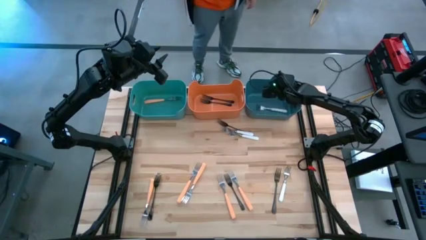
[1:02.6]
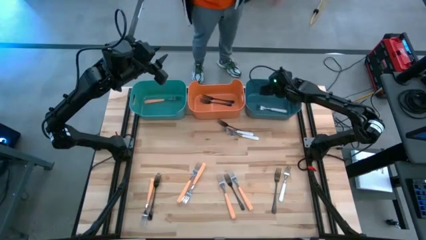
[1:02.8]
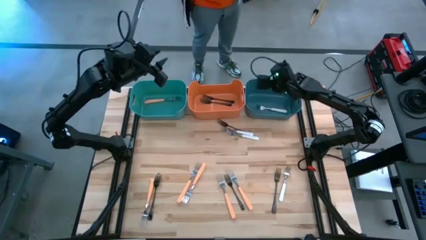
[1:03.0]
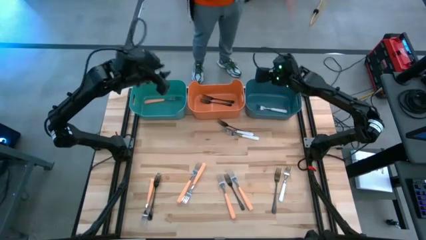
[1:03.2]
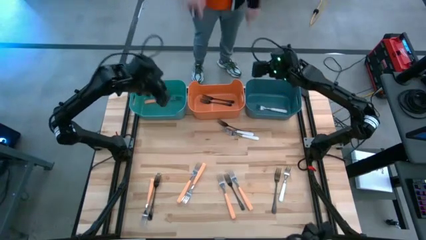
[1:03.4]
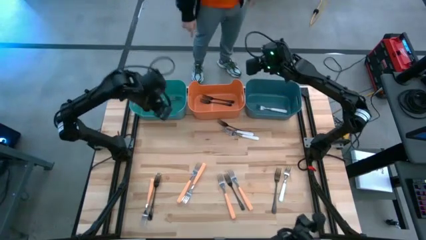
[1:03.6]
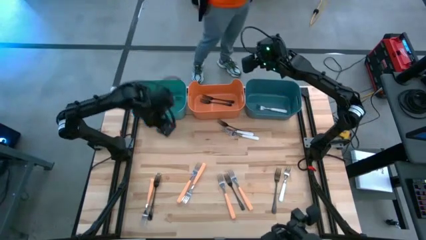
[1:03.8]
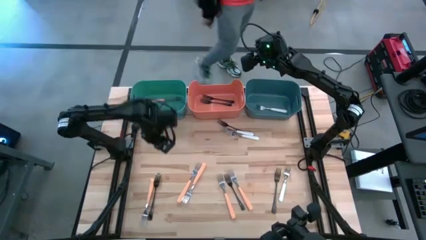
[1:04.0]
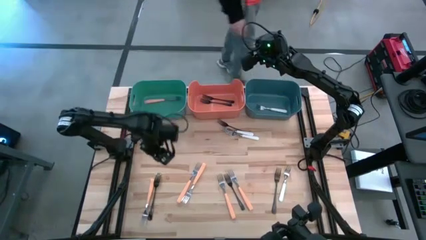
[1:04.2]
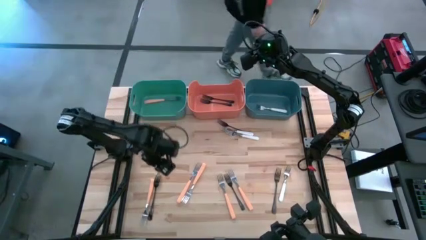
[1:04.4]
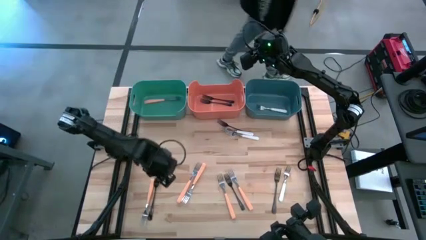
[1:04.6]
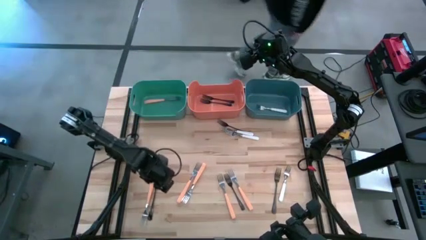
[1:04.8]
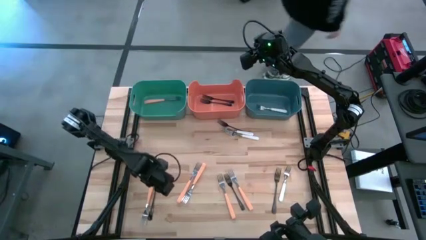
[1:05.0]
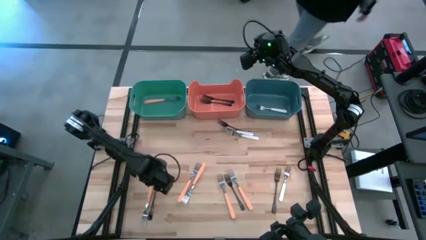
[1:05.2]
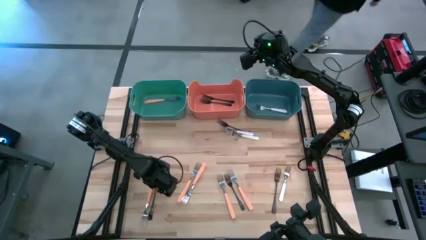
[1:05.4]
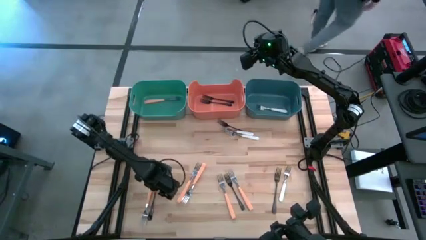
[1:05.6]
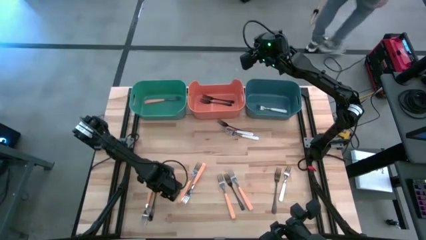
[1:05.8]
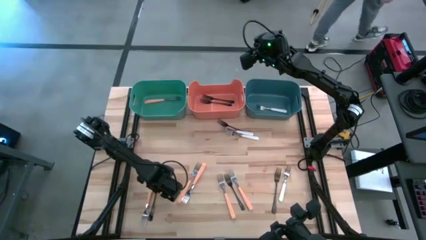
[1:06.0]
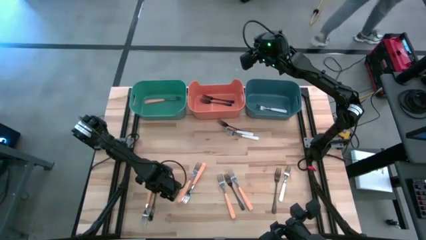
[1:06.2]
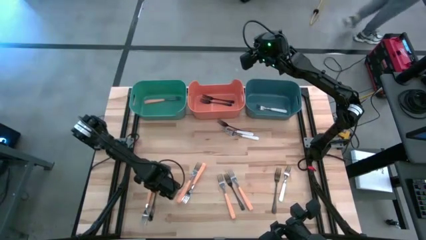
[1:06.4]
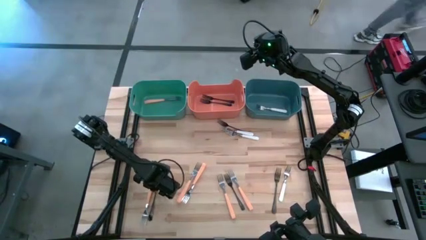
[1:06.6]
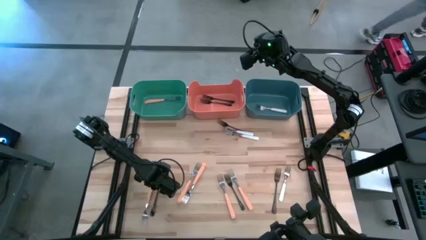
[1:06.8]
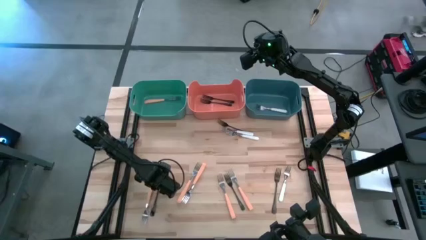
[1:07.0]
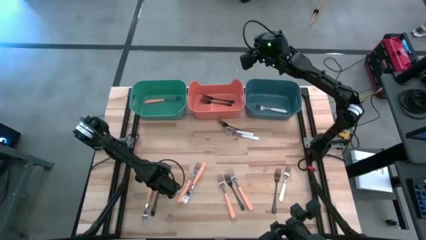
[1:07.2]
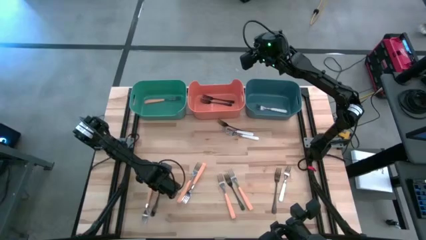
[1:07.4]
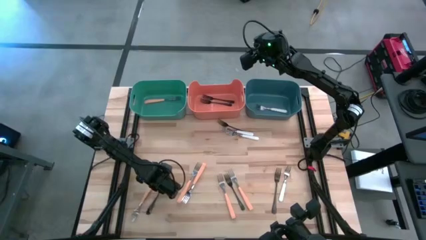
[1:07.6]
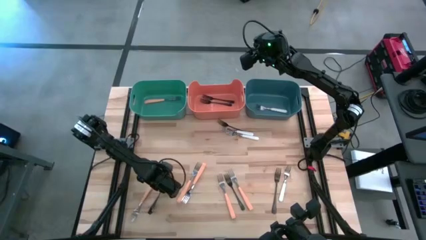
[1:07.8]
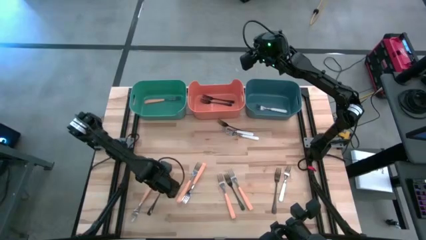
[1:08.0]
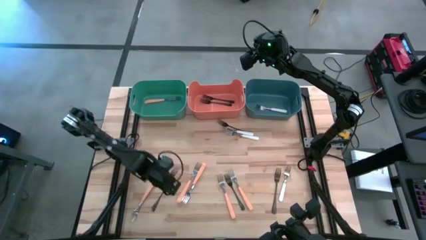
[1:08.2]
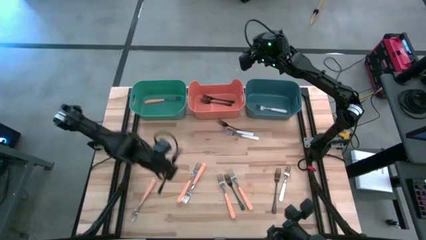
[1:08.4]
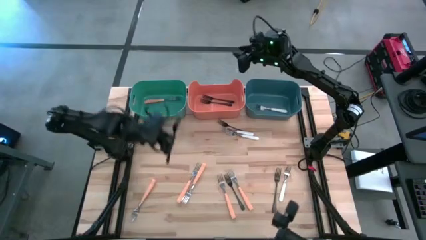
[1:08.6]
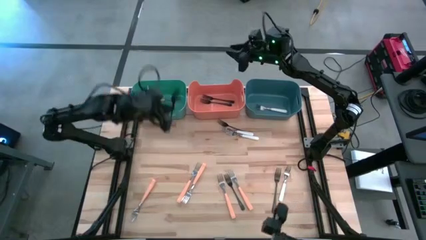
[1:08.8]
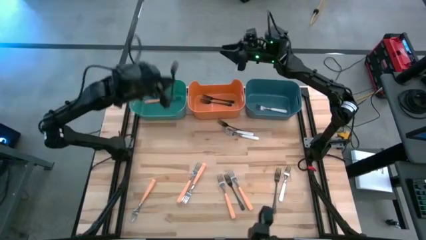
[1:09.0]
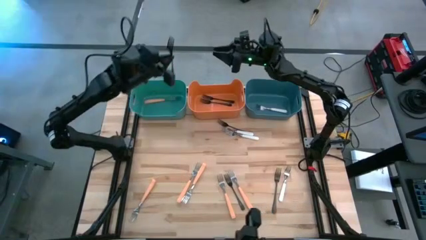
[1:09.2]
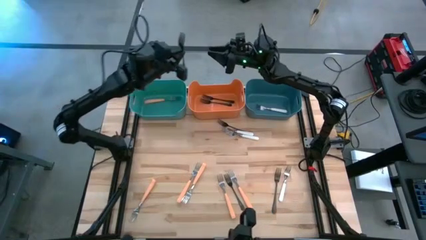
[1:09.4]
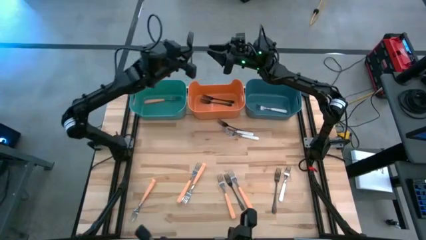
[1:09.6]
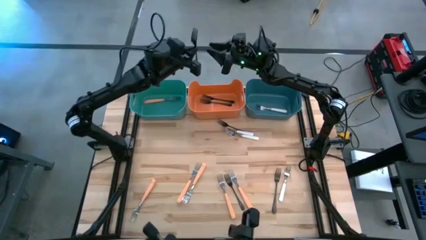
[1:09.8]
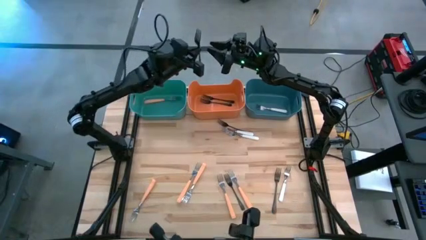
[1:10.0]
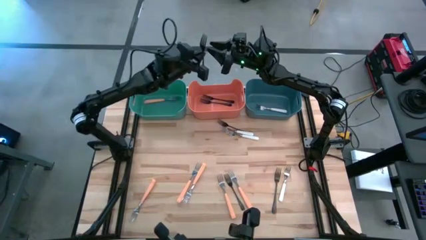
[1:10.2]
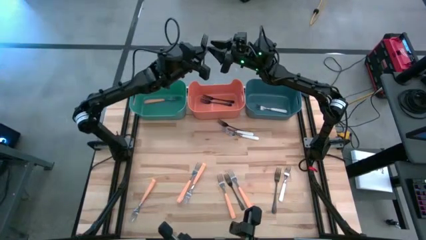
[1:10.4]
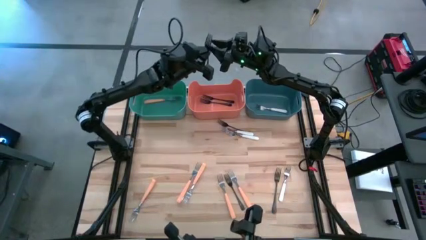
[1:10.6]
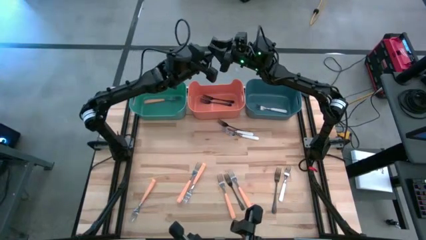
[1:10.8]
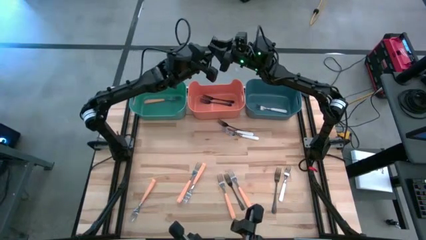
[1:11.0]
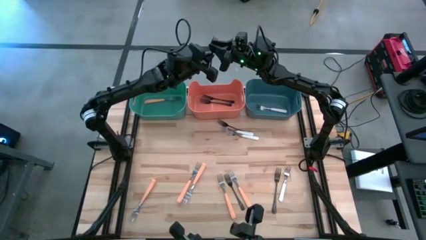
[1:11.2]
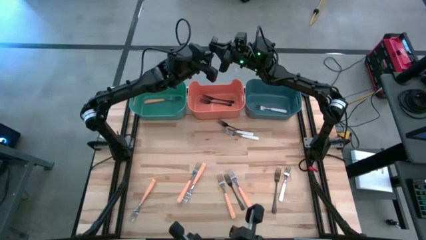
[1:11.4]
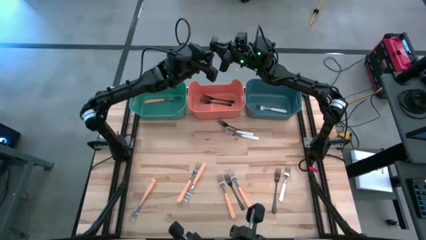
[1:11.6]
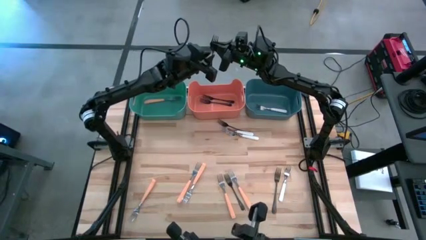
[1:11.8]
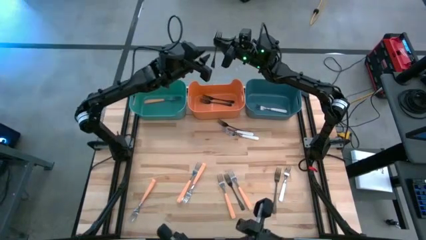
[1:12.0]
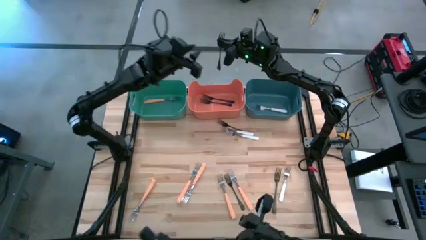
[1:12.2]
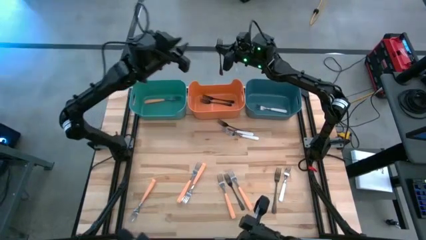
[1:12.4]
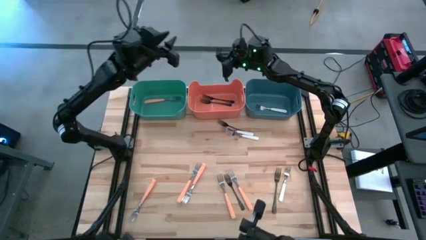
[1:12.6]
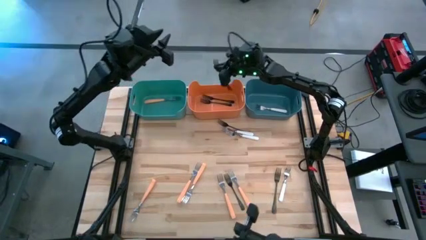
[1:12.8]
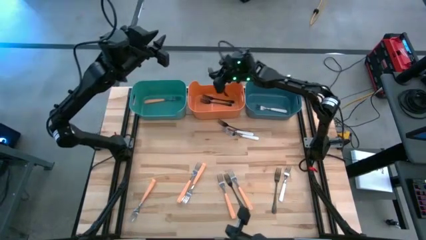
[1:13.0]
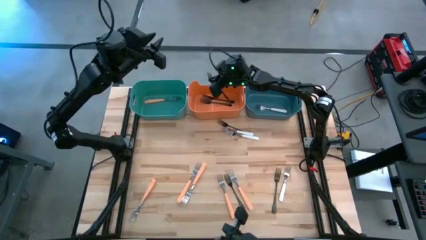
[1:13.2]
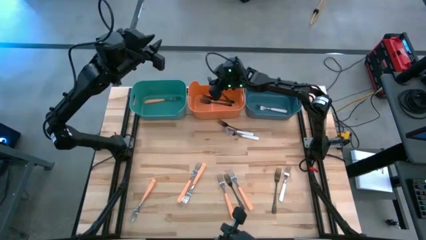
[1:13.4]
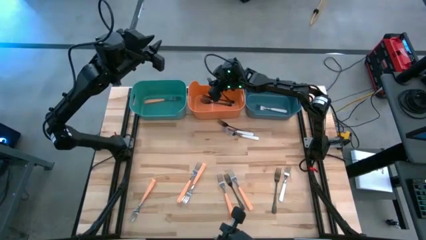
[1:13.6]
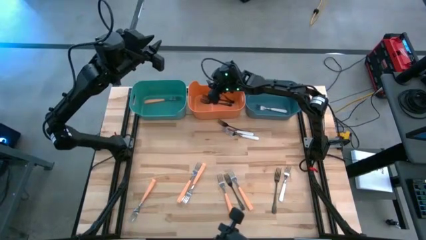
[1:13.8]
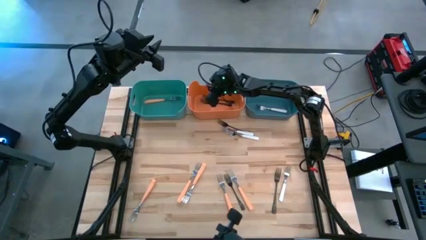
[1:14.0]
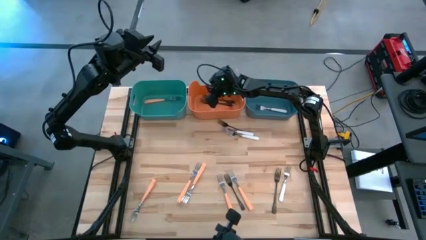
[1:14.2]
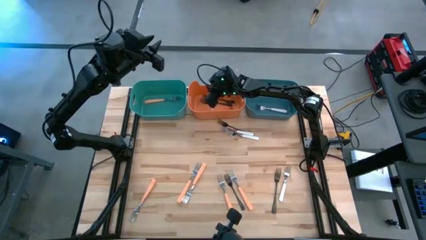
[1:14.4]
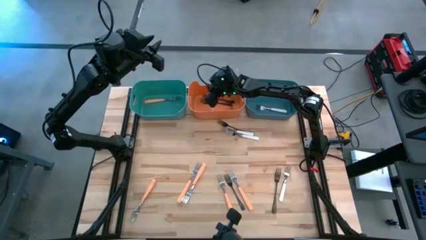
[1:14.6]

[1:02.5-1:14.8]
Task: Sort silverware by color (type)
Put the black fork into the orange bin

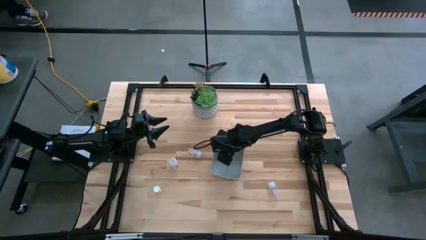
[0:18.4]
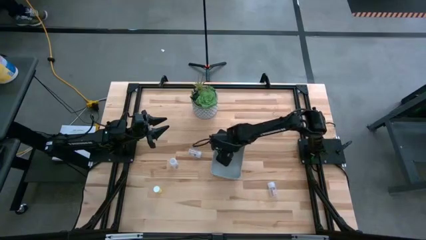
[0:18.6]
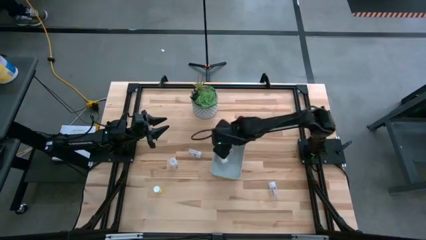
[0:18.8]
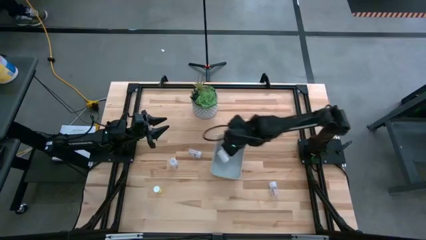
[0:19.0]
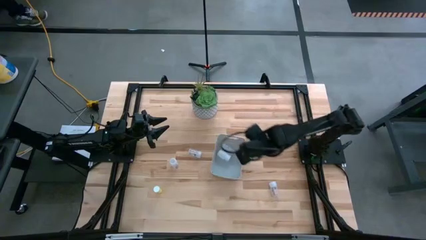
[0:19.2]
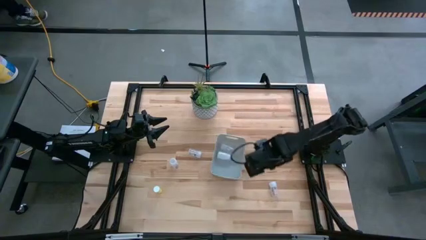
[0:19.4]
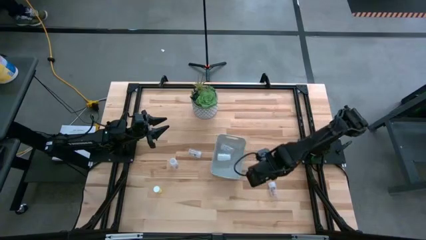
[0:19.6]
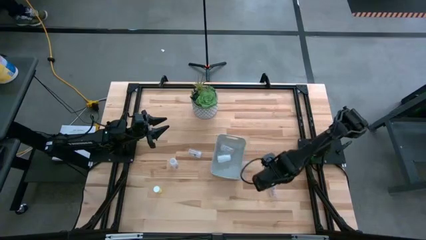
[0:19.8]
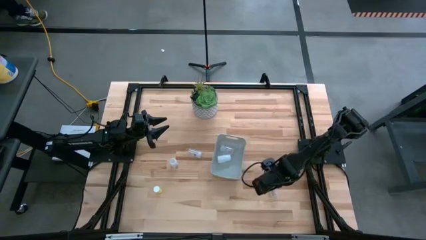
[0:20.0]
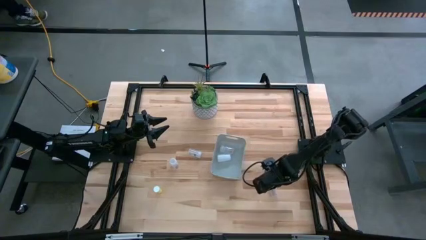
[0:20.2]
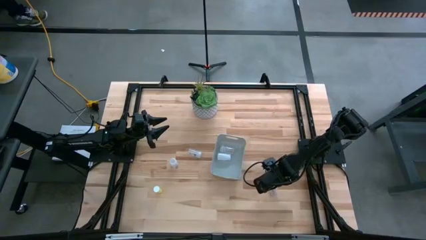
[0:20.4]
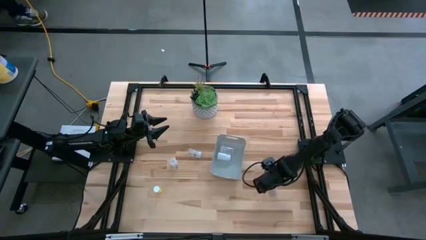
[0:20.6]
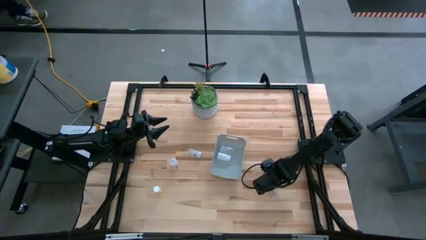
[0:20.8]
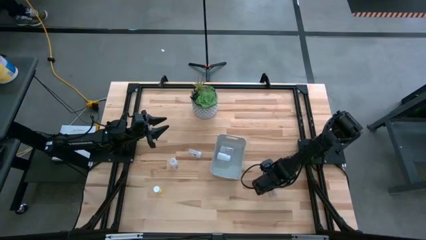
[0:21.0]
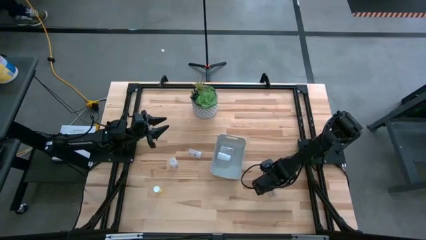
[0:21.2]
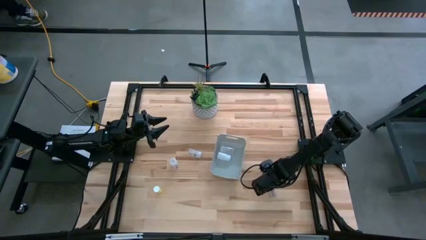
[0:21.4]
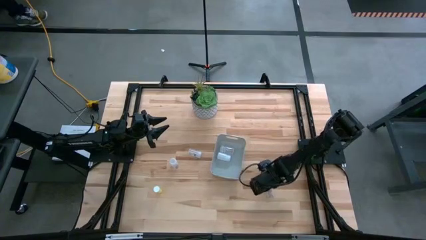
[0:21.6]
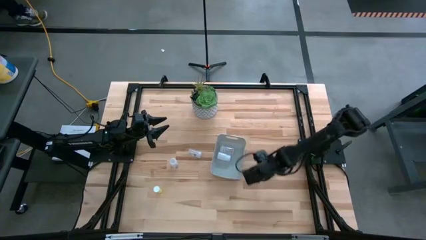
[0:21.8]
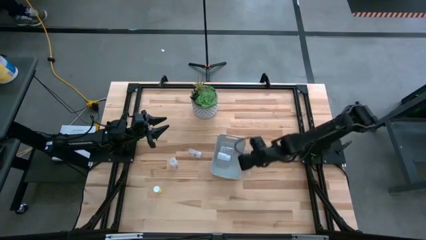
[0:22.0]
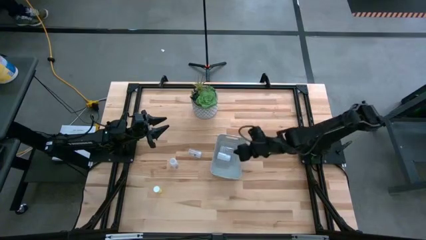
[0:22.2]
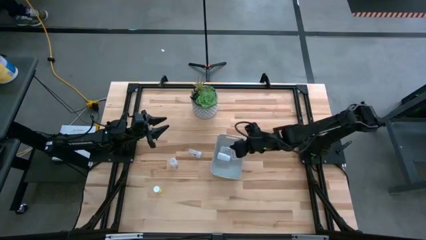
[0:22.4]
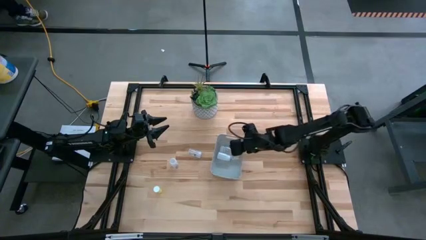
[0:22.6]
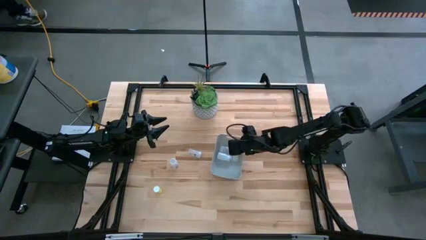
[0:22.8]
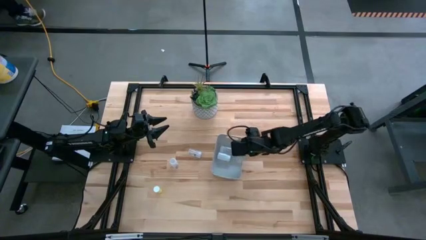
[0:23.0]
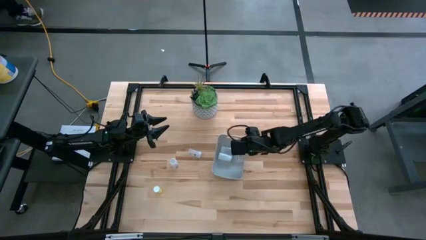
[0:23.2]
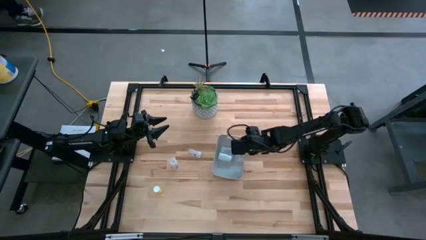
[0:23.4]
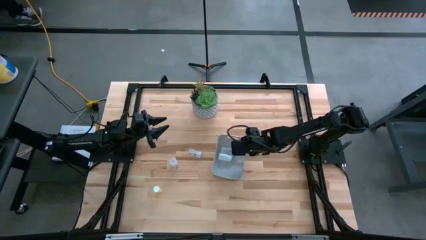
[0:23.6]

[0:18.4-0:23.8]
Task: Pick and place pill bottles into a basket
Put the bottom right transparent medicine bottle into the white bin
